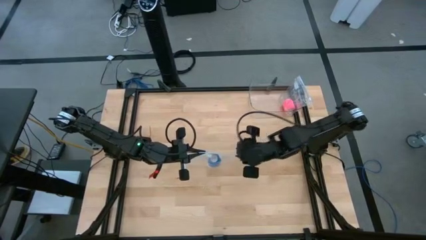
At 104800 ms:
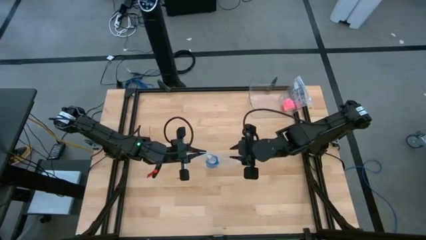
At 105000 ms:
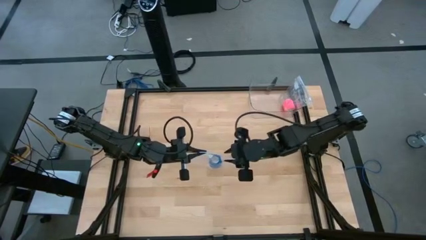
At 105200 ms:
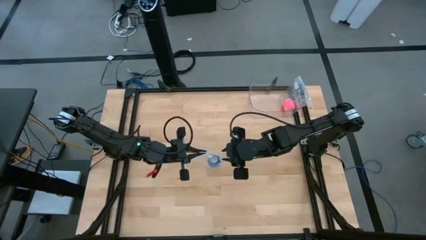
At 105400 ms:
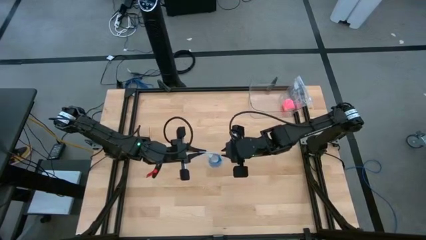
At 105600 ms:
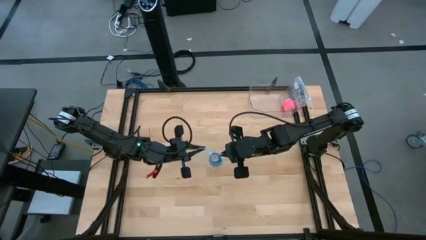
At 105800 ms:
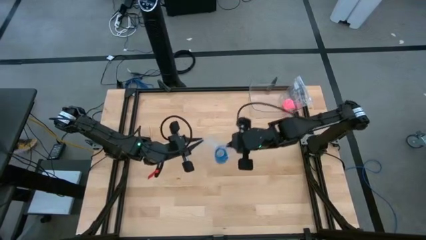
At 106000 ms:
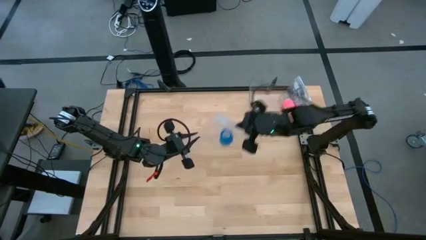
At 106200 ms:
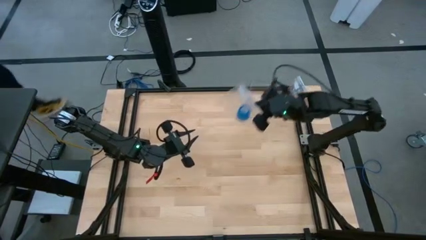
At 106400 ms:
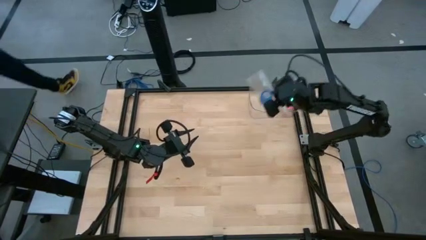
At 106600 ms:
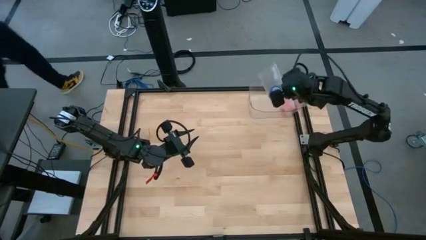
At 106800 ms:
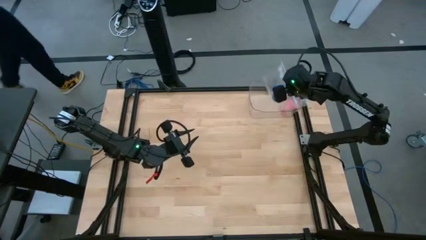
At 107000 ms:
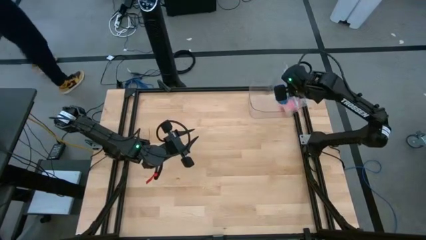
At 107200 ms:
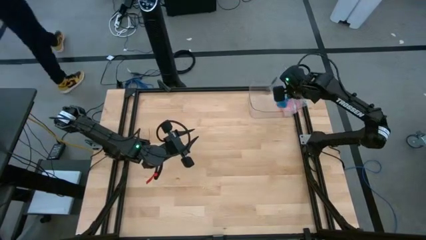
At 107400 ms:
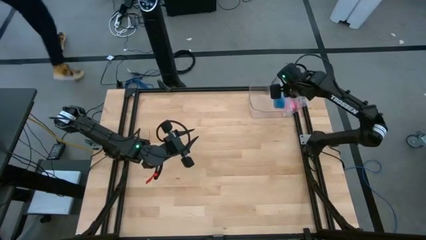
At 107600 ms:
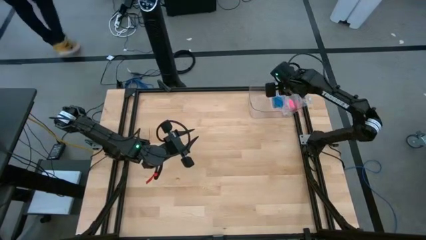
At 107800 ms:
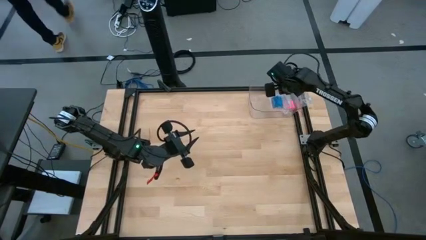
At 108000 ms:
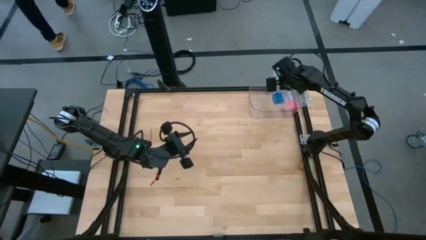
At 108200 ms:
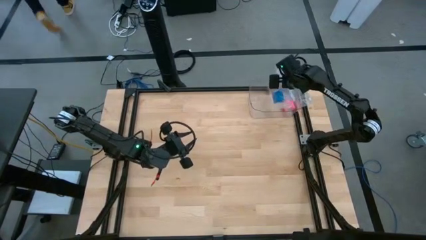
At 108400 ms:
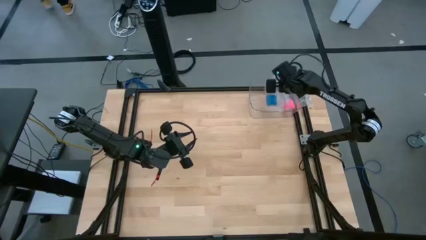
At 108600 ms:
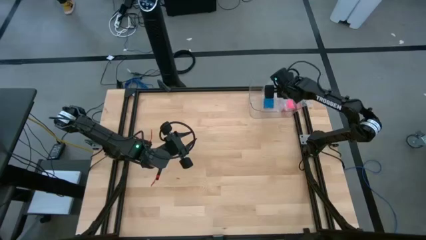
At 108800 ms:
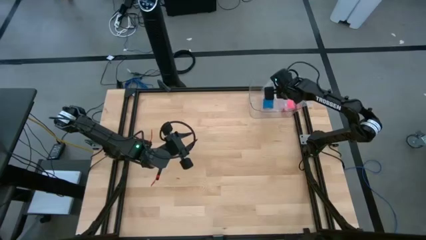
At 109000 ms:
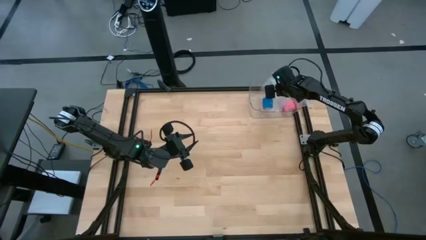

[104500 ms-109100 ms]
Task: Roll bandage
Put the transparent zip bag into the transparent bin

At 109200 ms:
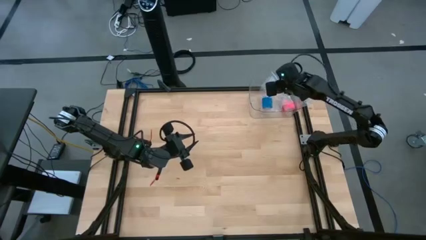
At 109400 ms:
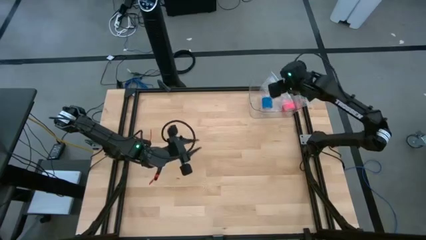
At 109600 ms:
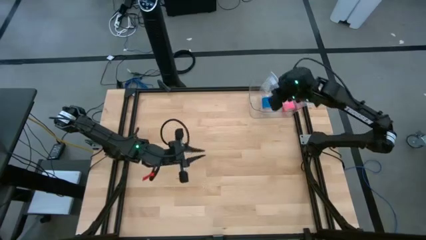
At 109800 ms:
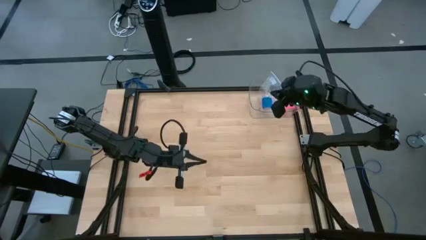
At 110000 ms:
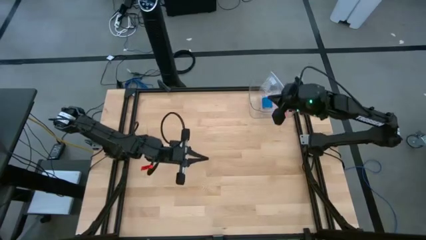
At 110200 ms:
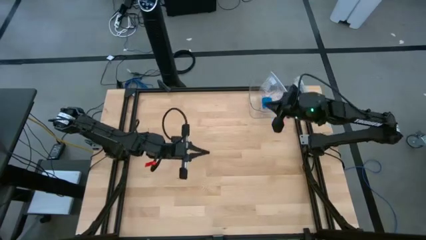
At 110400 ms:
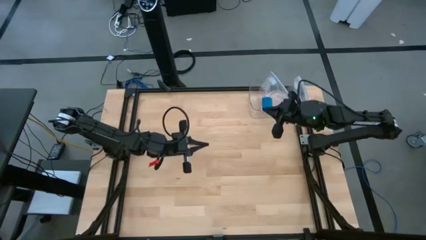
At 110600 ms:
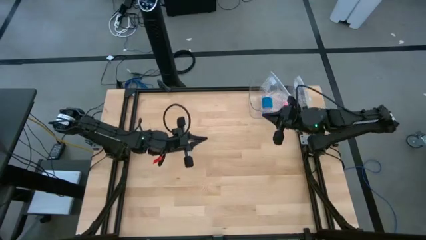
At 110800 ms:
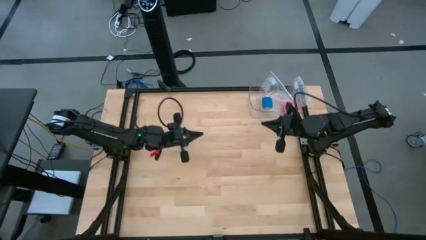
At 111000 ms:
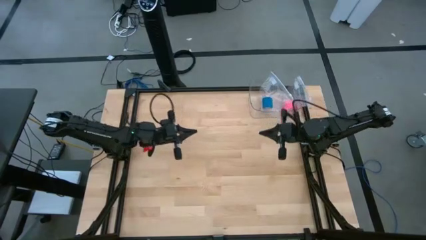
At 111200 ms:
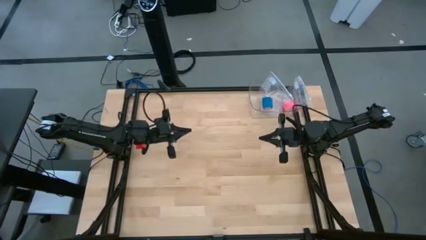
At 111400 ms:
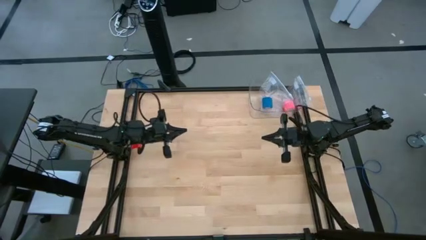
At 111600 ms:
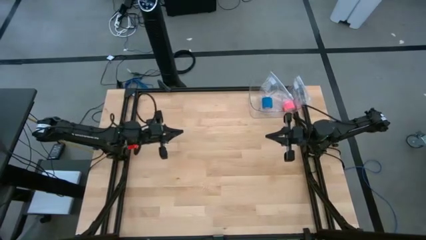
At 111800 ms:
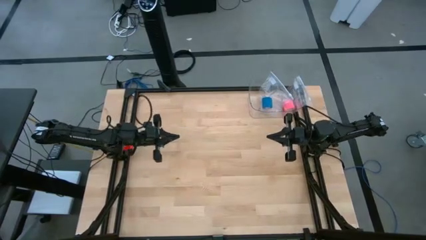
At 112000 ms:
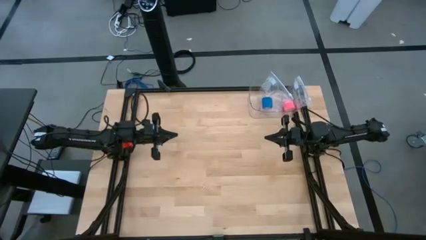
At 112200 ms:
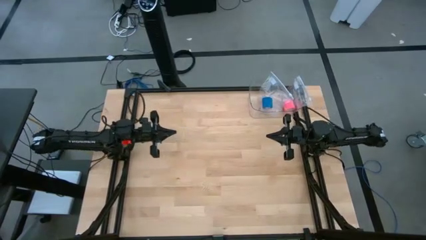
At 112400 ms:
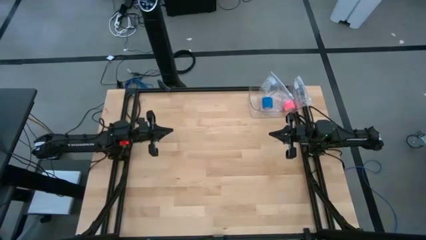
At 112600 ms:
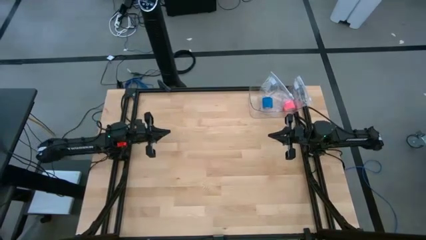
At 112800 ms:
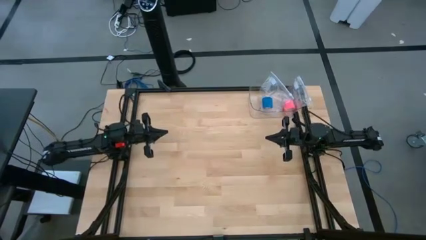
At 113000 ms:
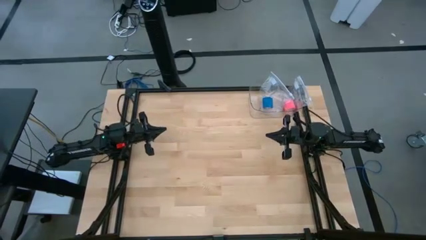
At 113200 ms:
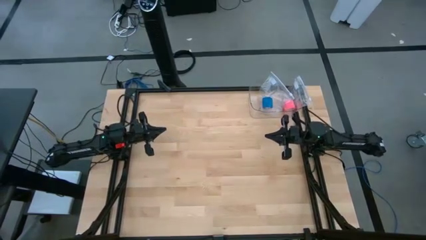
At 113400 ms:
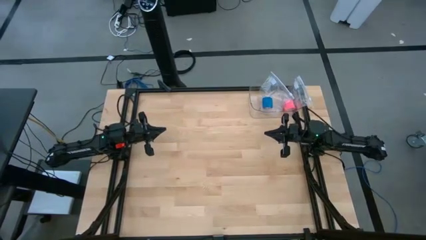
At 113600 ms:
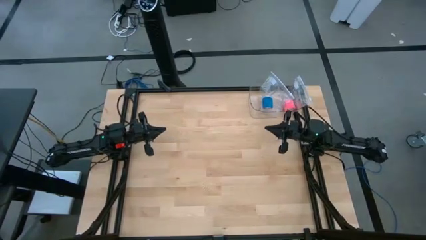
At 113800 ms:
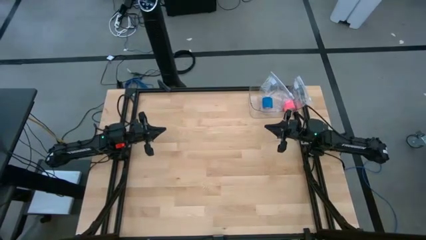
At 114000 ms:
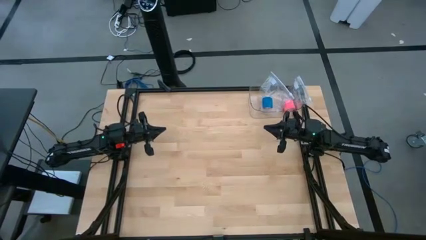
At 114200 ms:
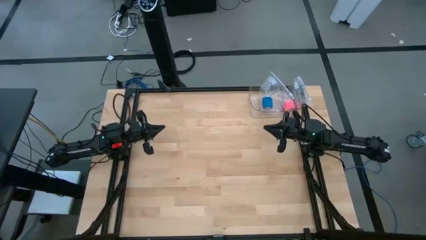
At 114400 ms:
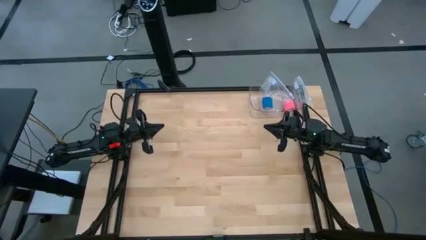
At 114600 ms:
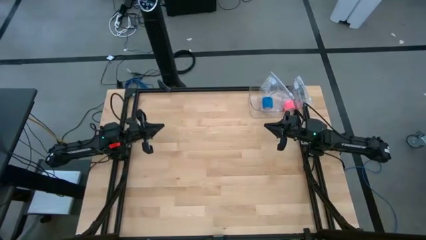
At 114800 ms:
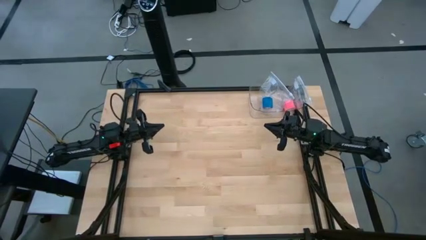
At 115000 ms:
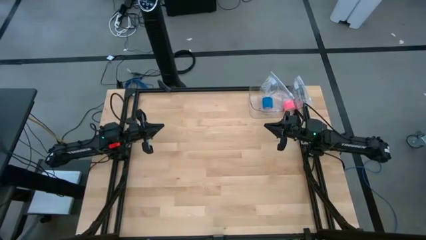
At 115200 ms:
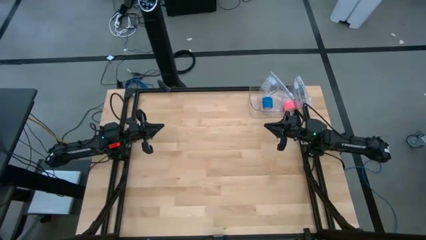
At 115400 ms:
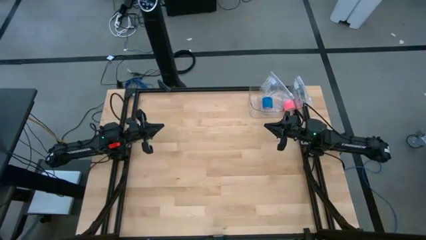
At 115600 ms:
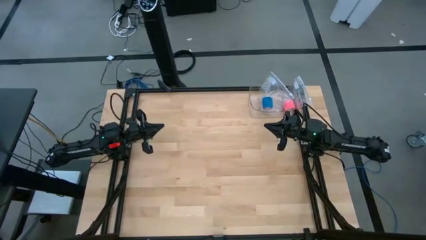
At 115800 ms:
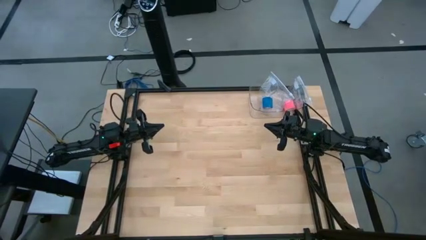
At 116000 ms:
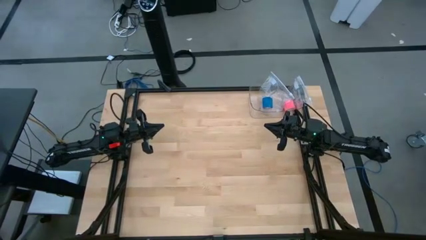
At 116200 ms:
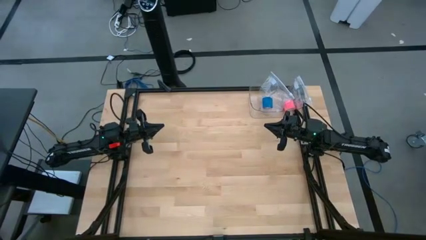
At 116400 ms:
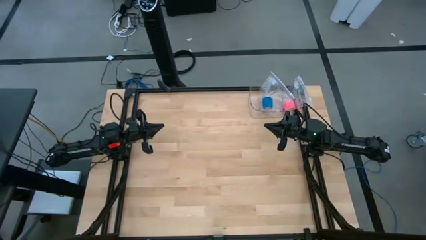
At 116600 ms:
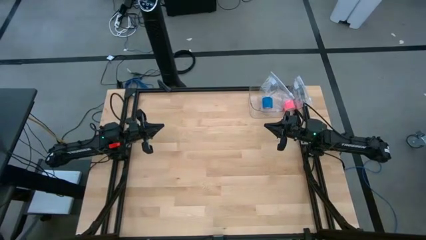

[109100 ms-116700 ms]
Return to Home Position

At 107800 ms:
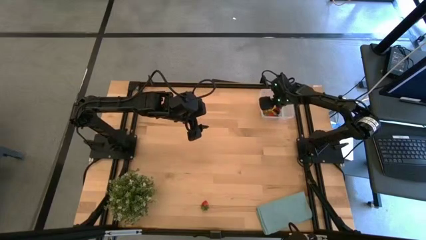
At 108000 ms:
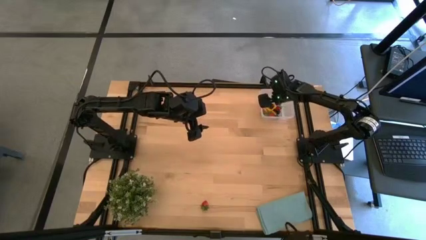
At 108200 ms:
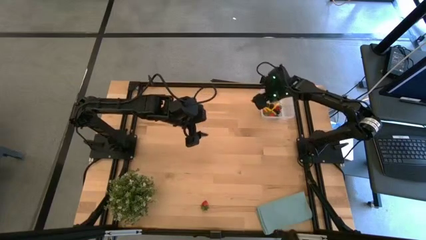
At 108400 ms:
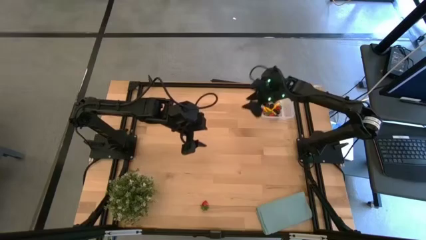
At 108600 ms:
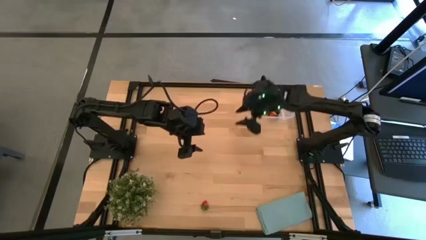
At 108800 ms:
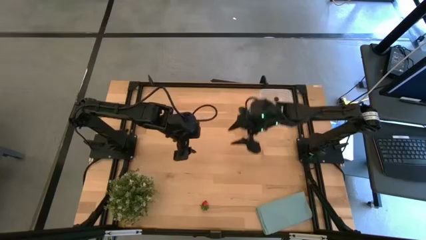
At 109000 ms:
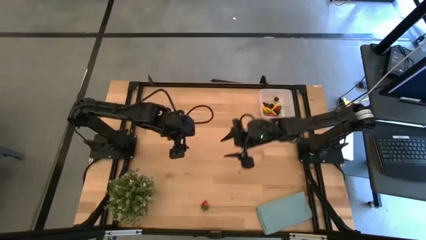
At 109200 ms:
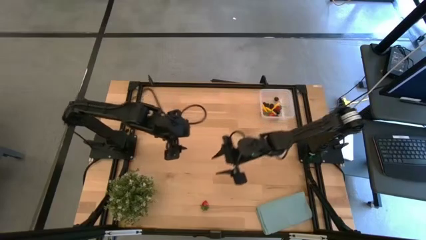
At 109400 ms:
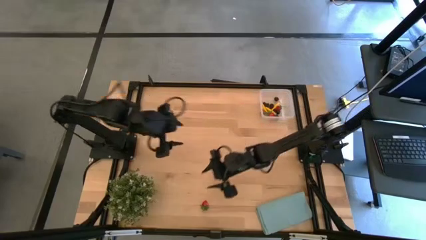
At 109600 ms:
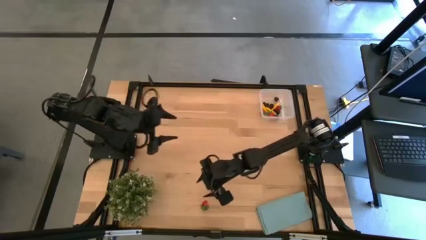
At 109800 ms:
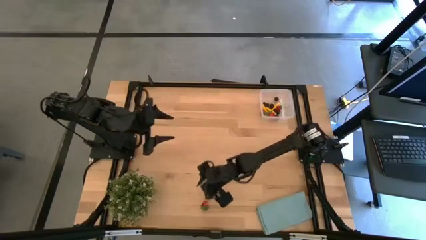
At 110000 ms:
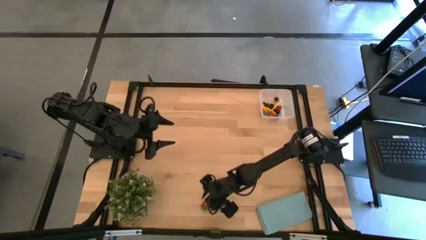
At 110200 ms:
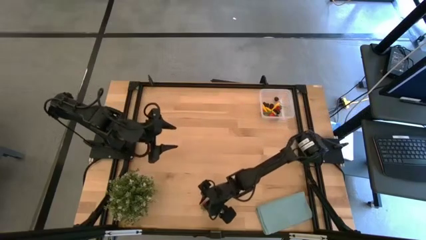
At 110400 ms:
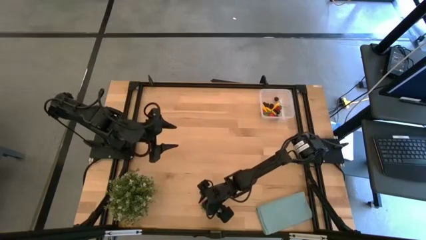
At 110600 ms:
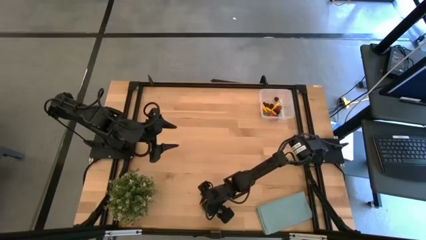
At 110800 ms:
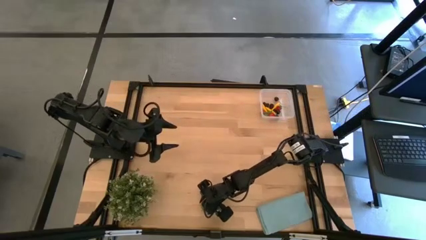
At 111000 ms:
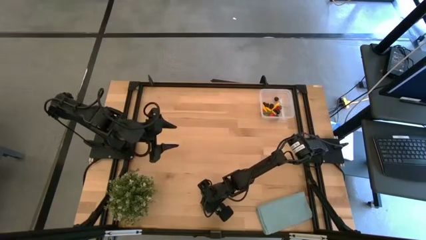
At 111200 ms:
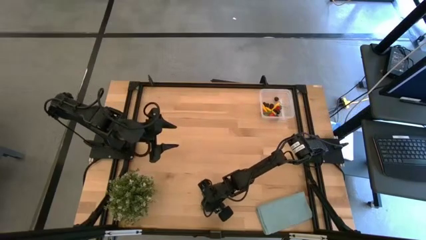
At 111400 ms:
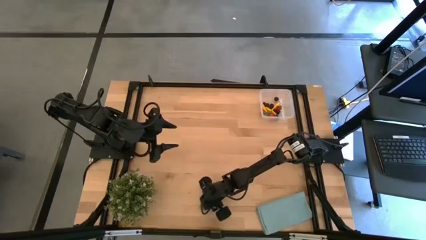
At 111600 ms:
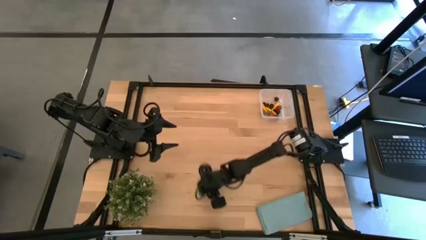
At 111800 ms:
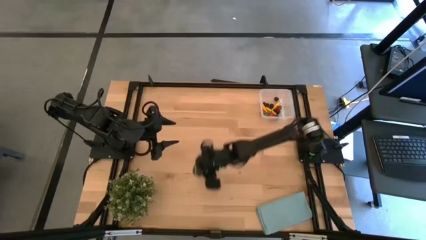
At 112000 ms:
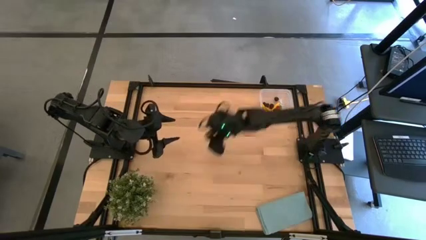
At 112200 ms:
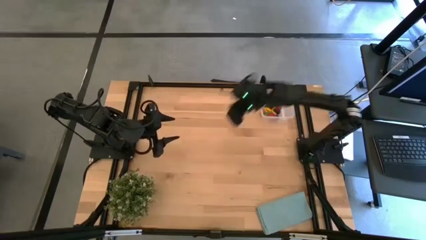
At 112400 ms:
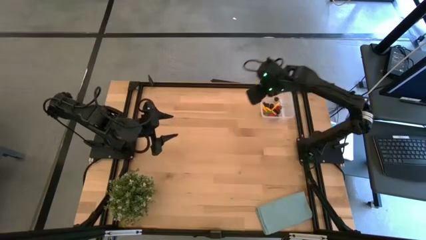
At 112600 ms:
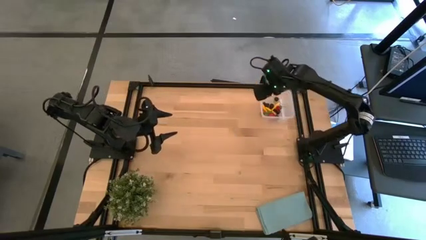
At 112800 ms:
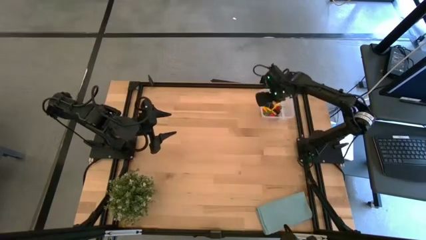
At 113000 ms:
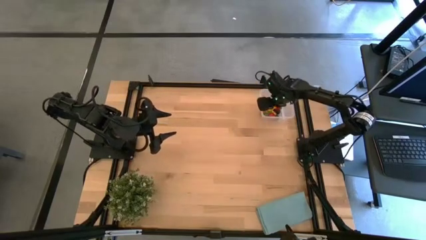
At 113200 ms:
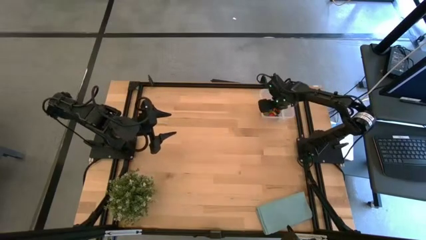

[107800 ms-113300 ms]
Task: Pick and placing Produce into tupperware
Put the red strawberry into the transparent bin
